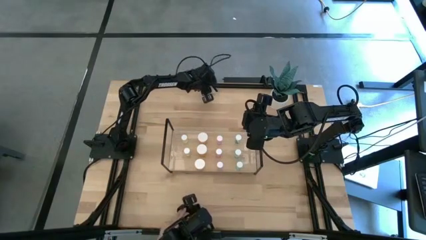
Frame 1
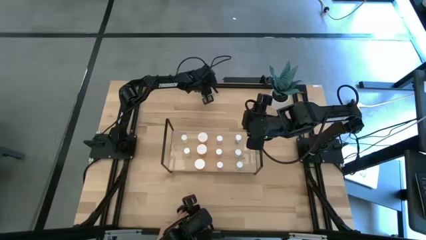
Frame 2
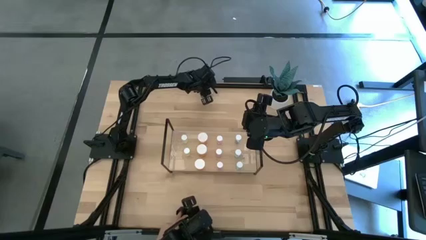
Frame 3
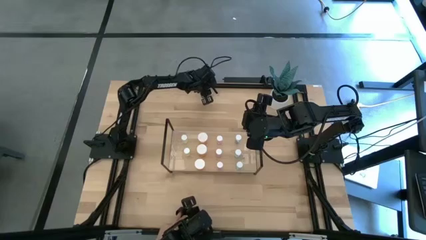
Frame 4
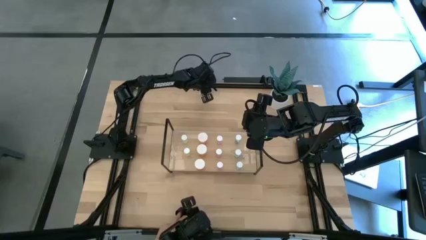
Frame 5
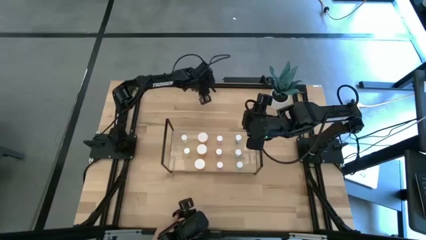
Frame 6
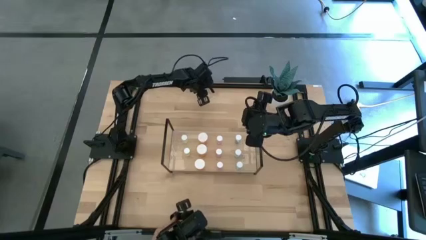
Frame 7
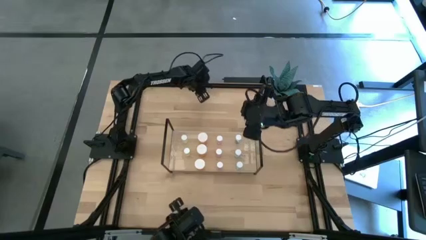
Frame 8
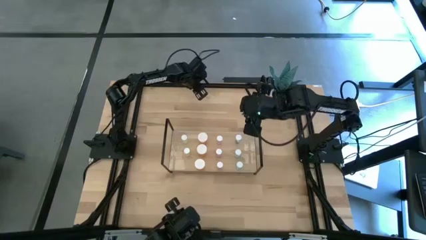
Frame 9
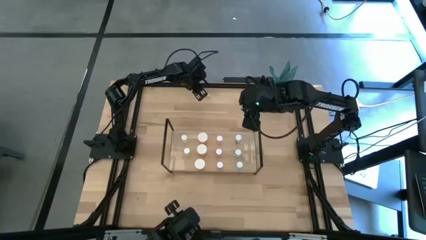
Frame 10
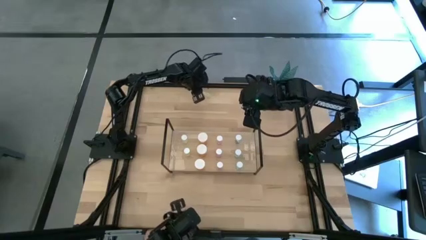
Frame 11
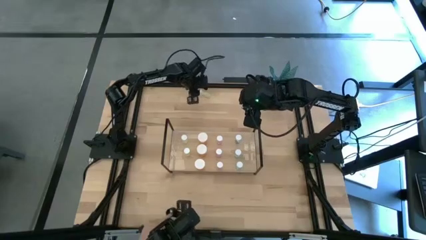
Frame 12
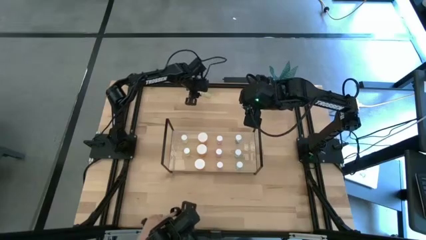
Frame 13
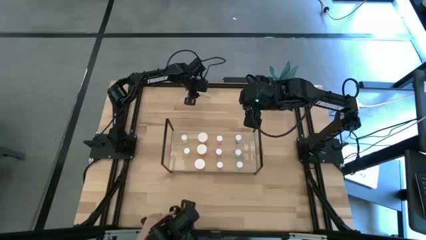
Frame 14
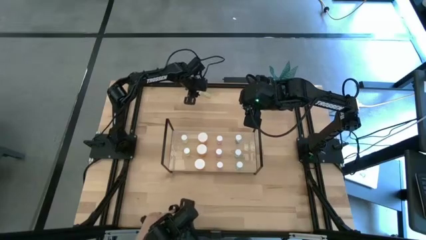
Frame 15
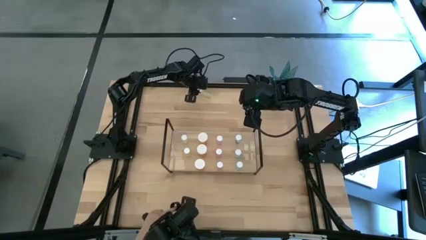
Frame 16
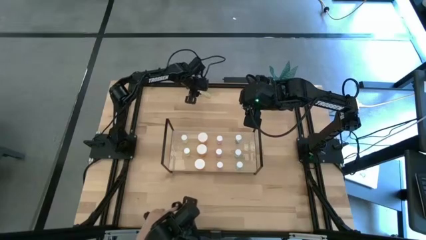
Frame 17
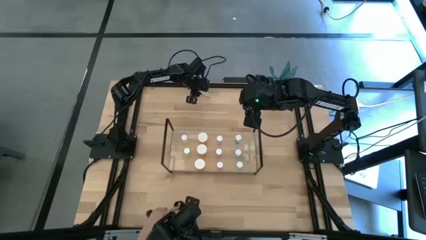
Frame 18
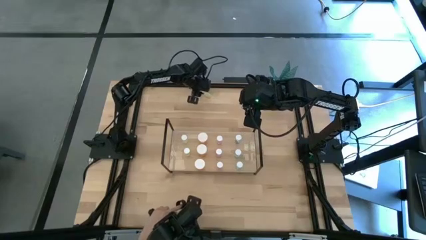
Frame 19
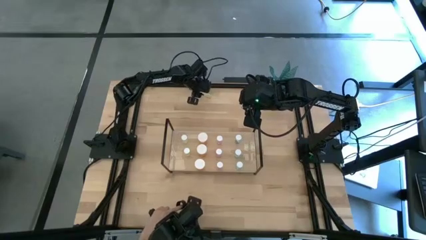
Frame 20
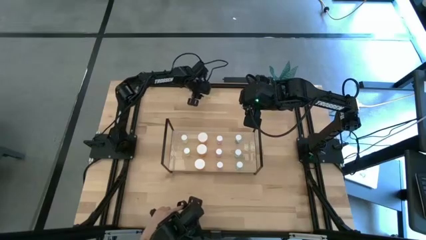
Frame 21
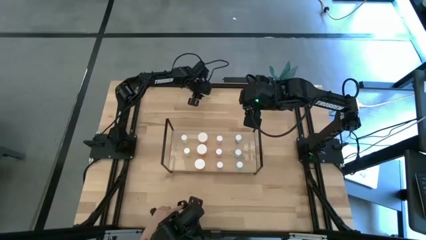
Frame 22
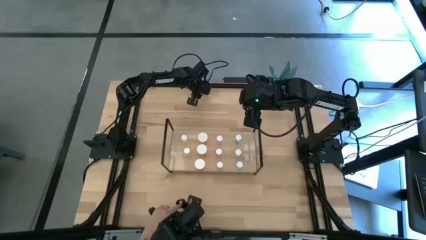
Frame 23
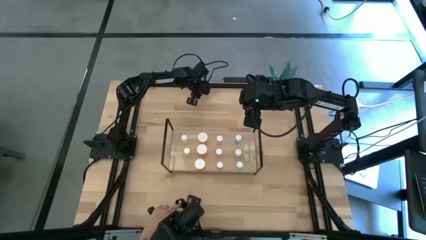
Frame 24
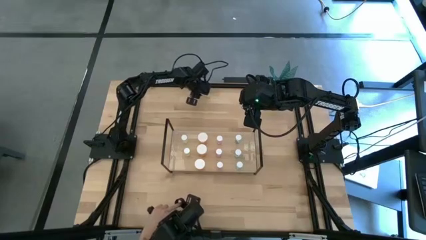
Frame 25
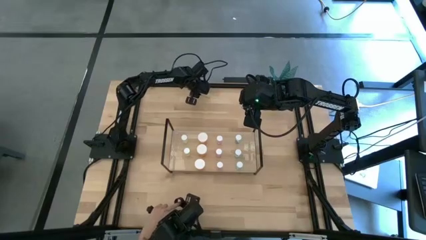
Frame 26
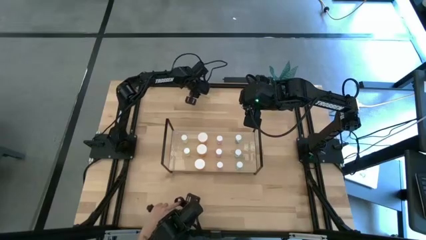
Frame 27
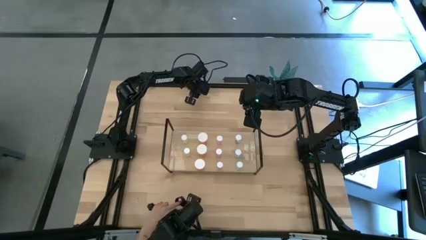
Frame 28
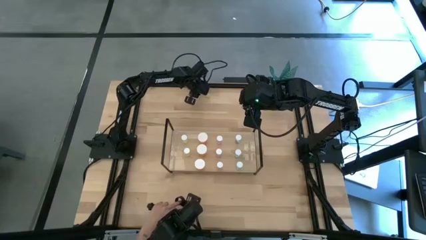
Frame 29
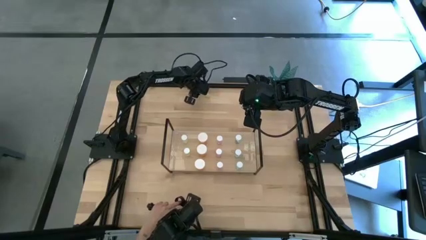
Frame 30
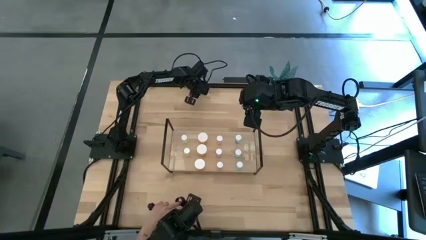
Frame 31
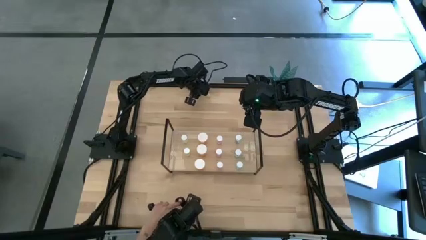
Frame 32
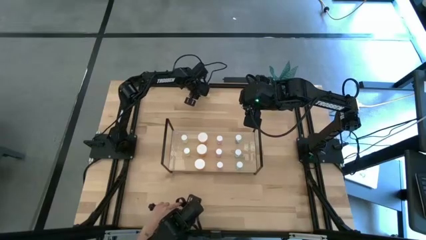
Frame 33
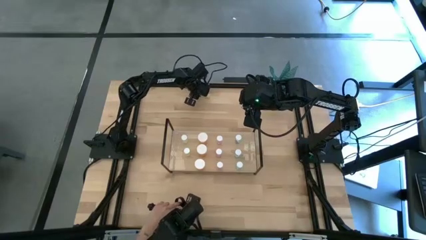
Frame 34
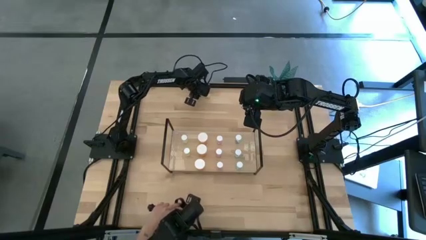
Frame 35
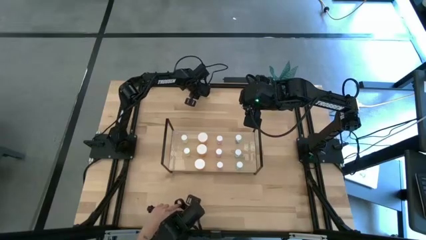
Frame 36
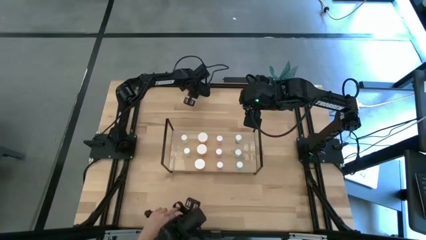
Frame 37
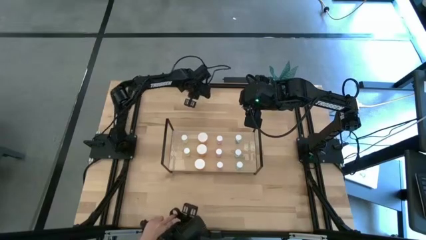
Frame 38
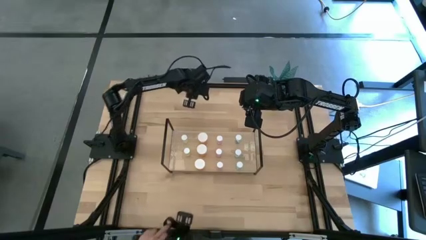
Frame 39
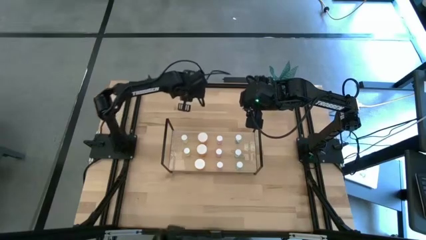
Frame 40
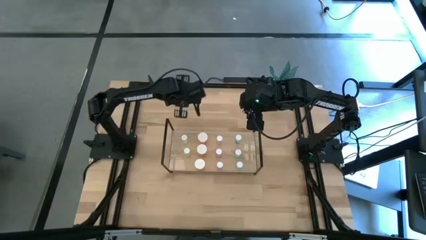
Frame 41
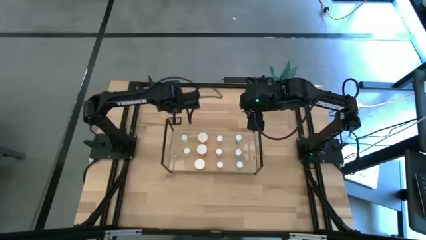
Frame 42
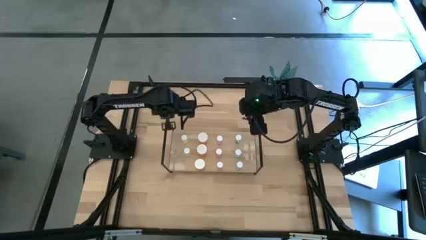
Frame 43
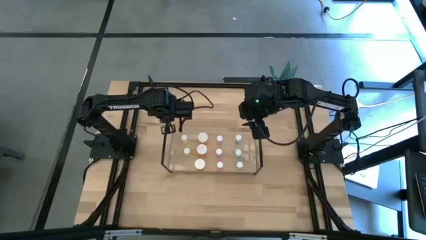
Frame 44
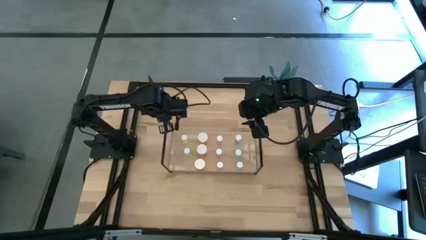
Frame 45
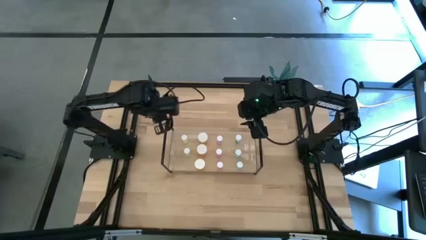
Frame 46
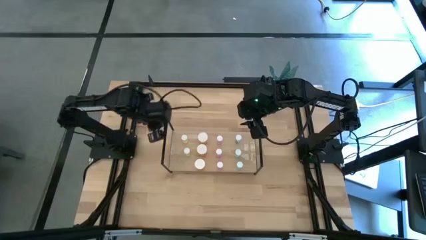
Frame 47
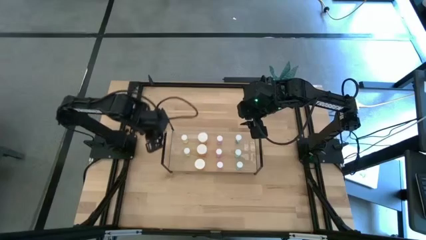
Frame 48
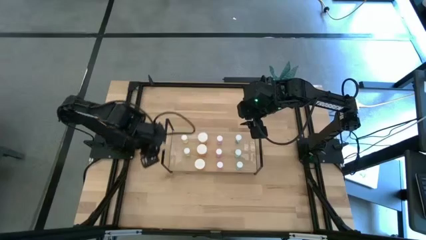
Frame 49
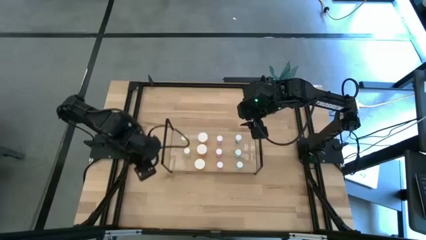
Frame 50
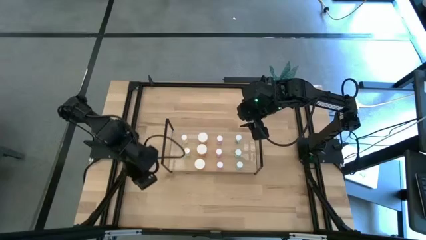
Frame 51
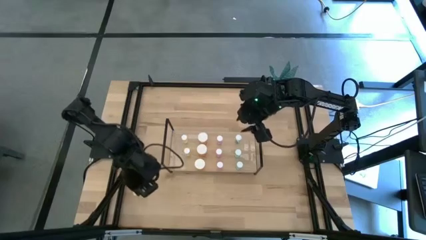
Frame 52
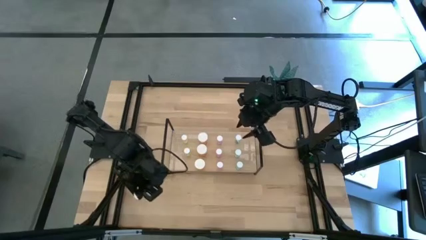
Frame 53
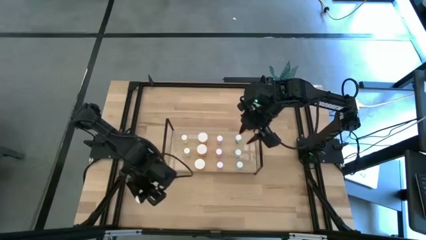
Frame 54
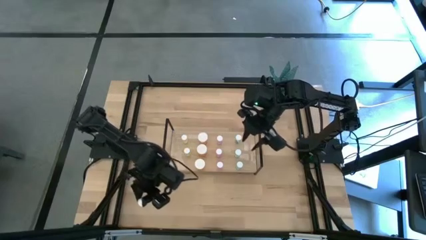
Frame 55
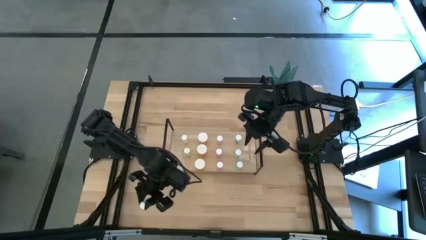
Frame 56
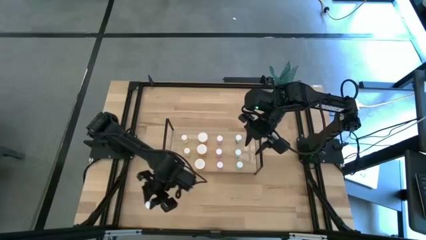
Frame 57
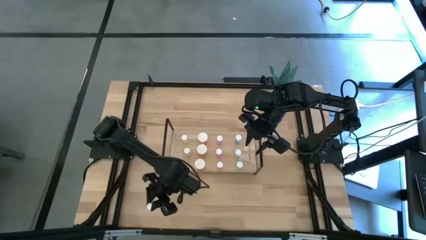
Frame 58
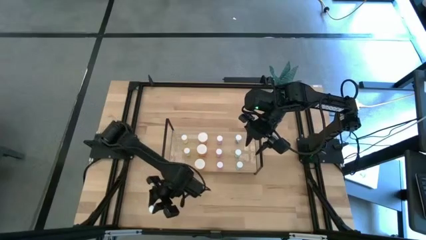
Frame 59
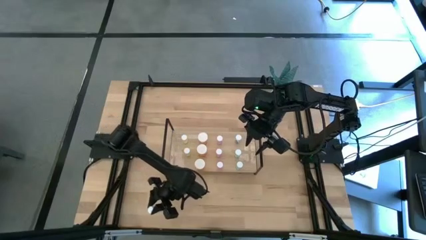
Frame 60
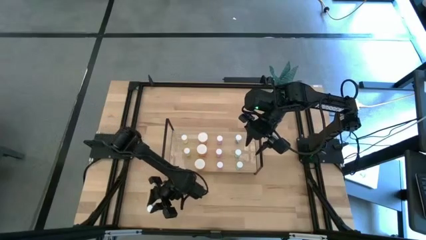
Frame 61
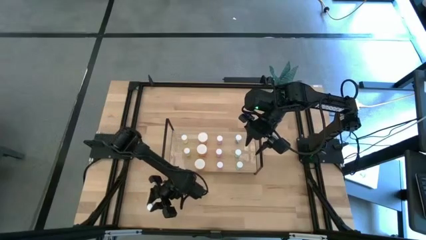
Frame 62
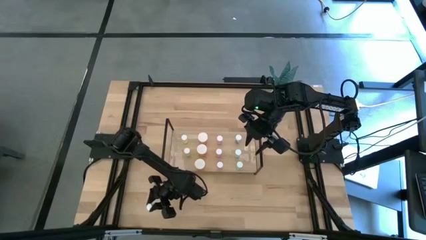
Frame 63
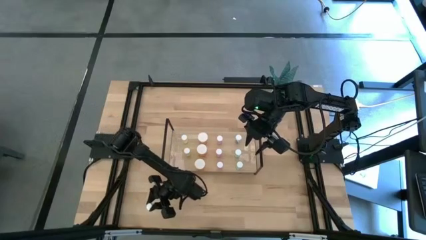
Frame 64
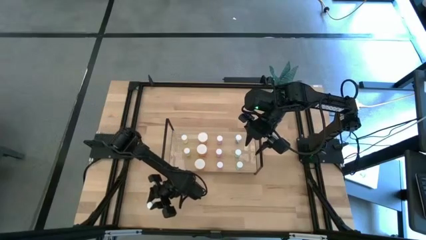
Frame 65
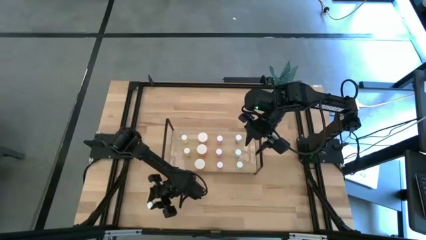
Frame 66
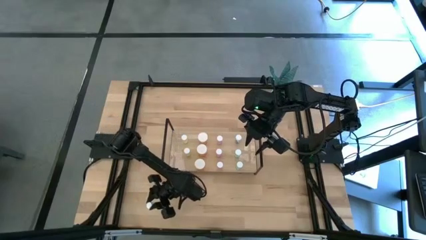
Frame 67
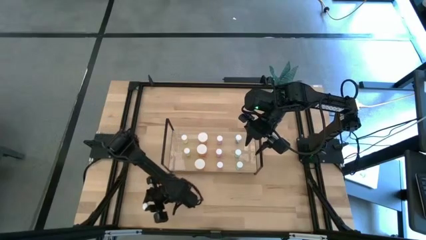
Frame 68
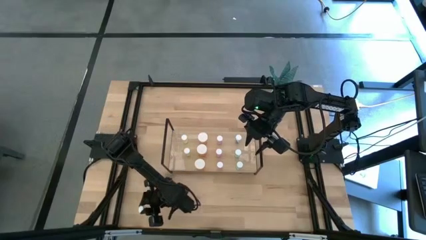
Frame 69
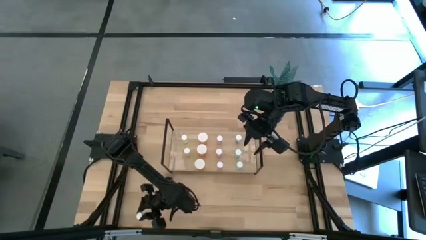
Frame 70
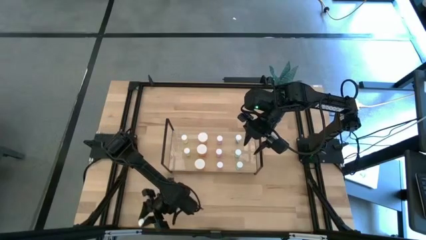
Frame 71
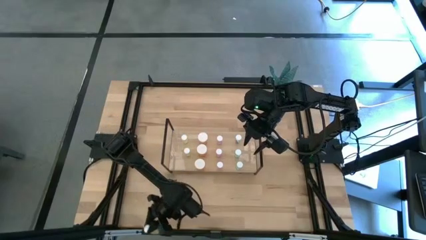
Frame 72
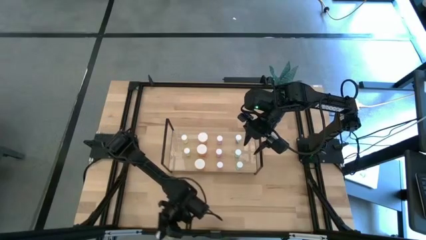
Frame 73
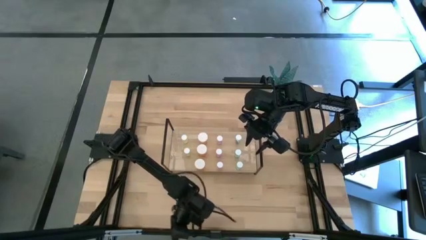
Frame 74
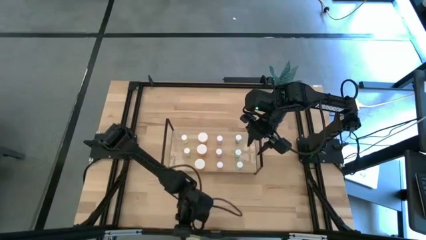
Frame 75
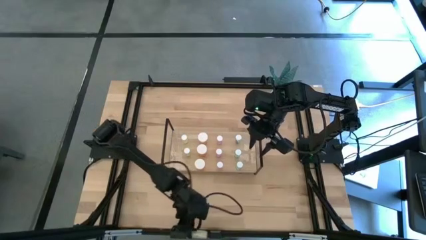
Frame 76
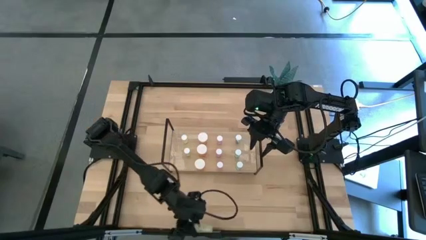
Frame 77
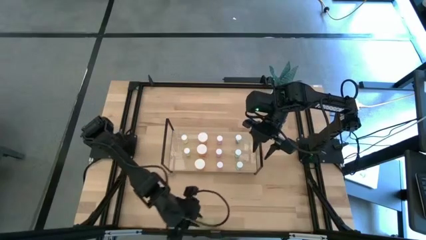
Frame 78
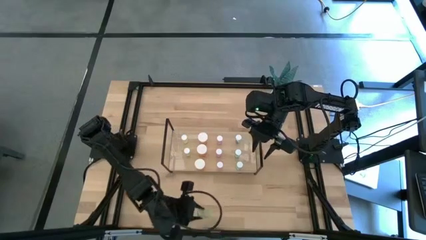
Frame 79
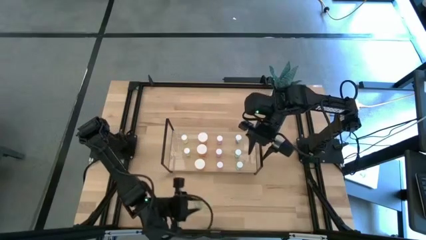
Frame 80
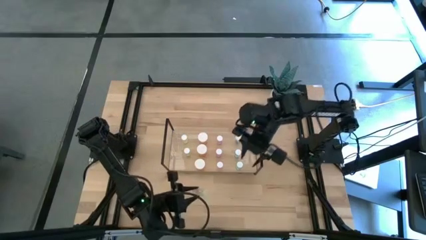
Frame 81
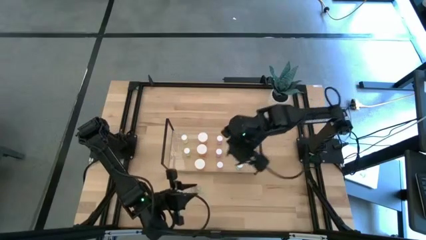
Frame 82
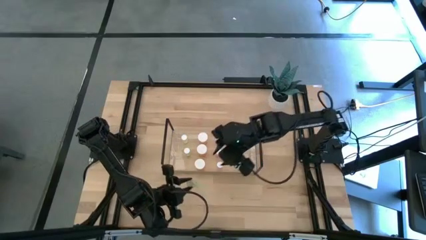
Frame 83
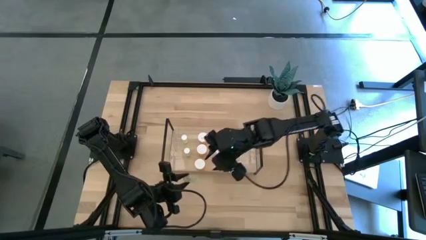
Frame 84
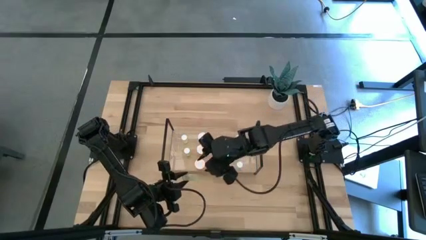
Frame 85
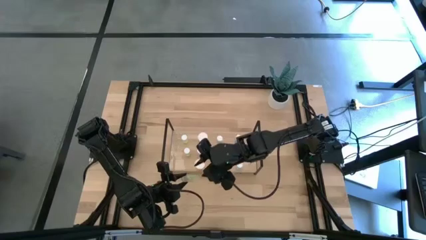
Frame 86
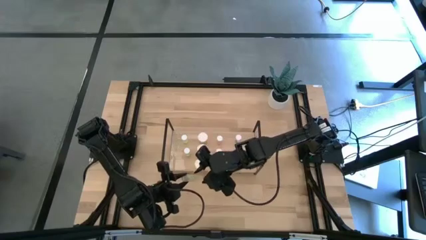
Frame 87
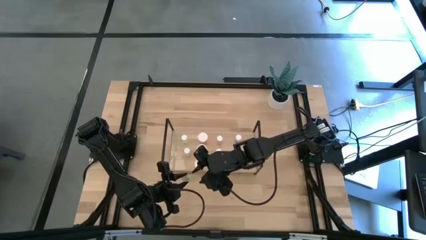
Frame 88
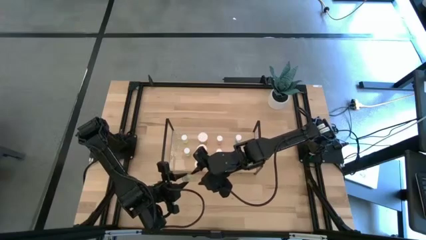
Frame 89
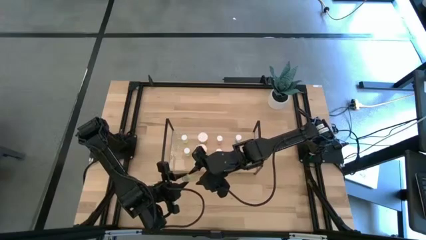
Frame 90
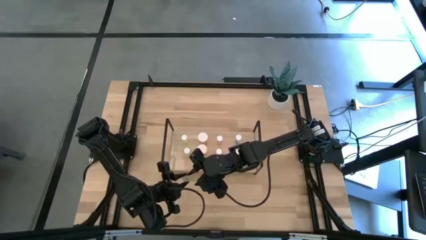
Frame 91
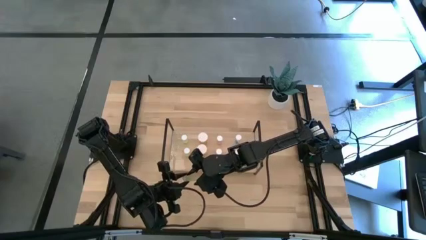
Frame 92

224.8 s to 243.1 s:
Task: Pick and place medicine bottles onto shelf by color
Put the yellow pill bottle aligned with the yellow pill bottle on the shelf
